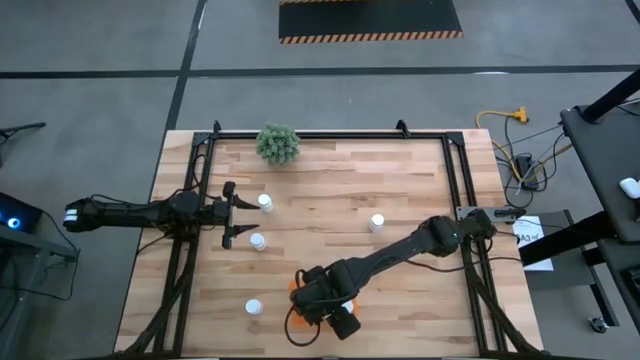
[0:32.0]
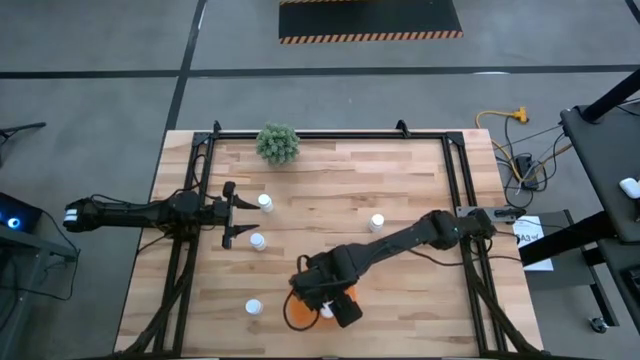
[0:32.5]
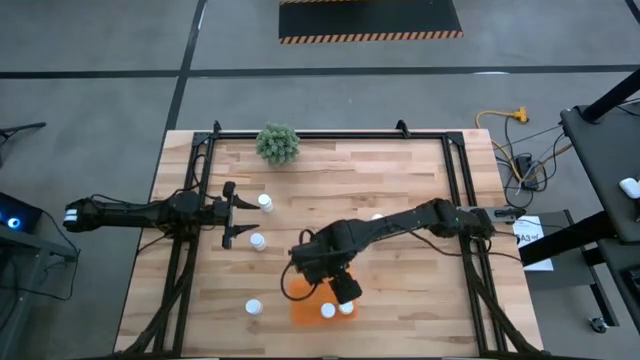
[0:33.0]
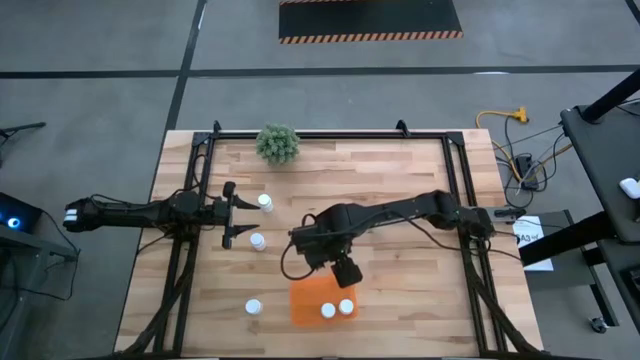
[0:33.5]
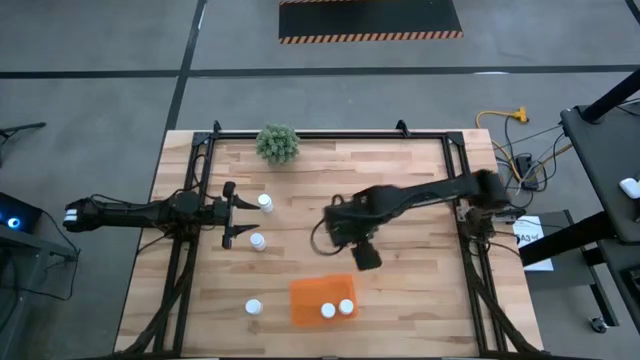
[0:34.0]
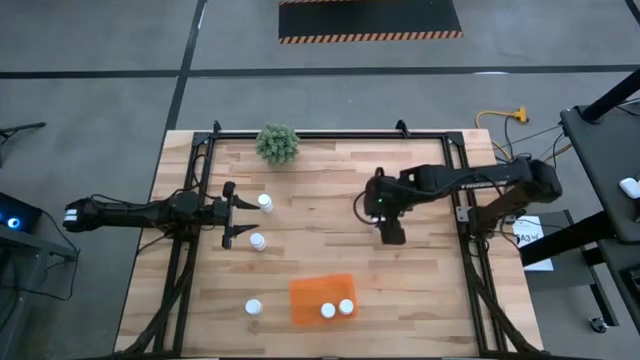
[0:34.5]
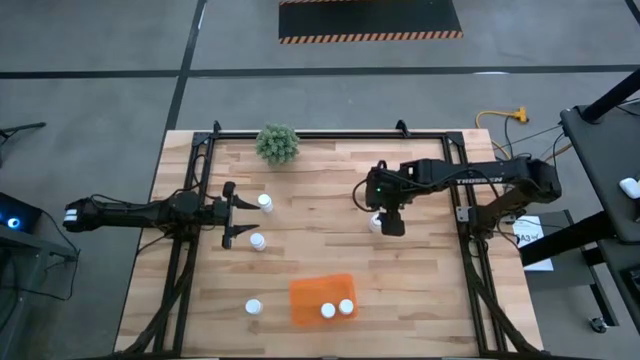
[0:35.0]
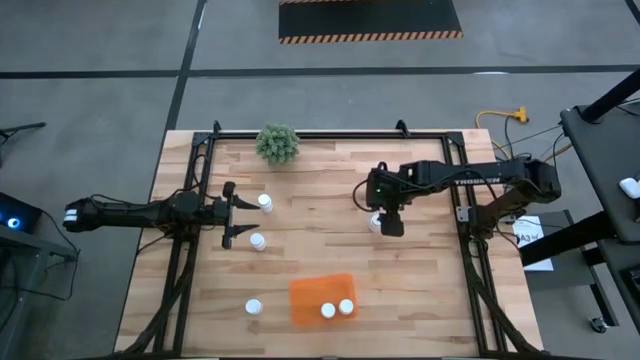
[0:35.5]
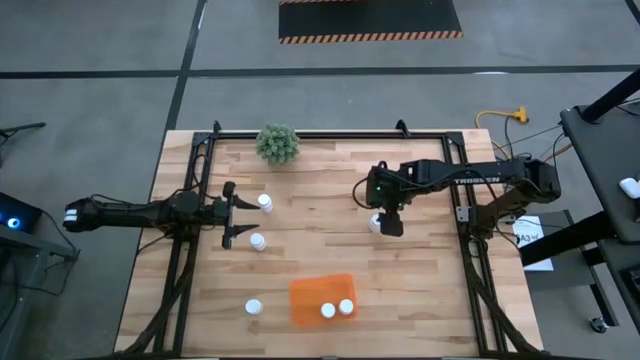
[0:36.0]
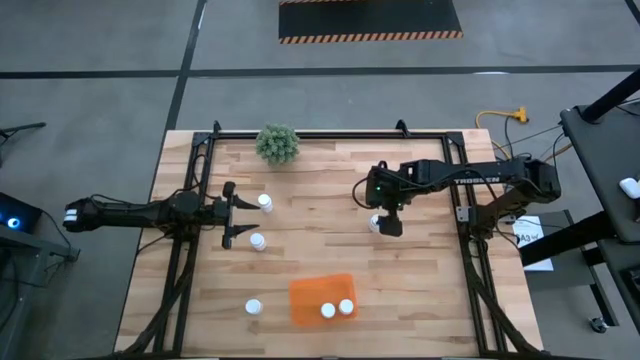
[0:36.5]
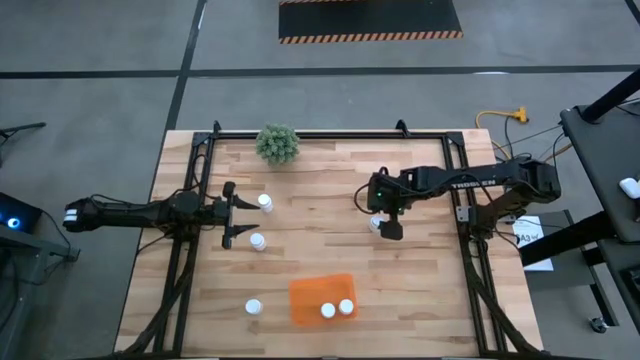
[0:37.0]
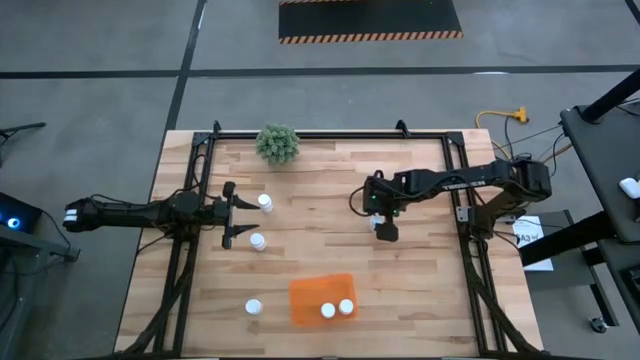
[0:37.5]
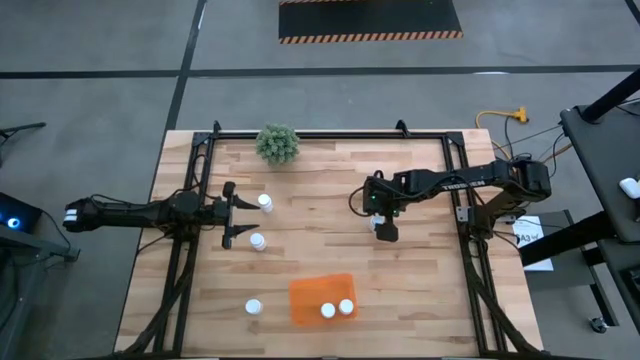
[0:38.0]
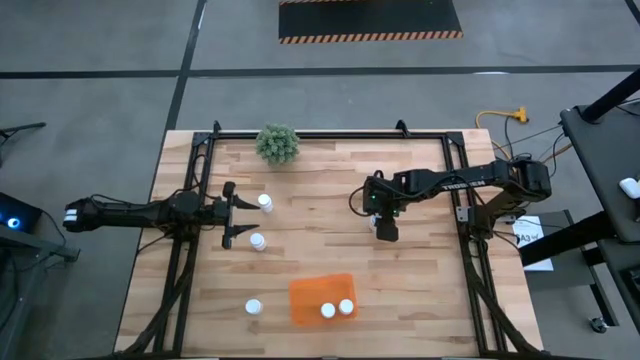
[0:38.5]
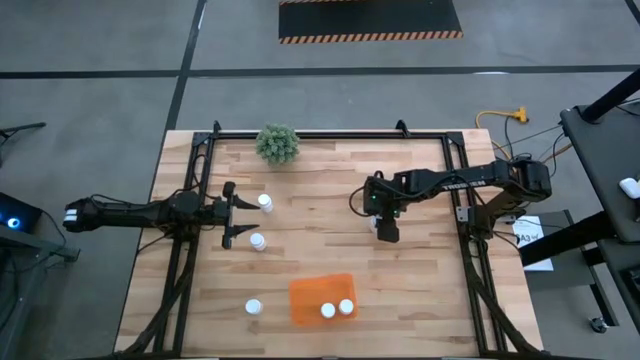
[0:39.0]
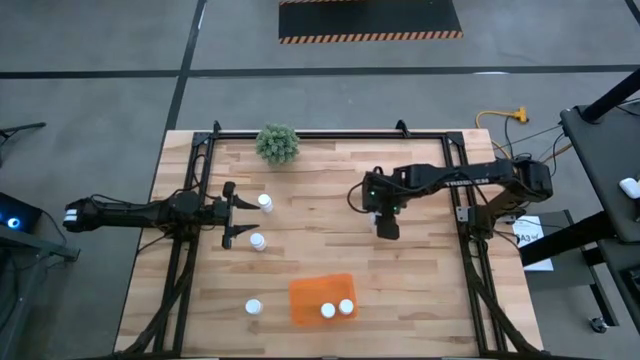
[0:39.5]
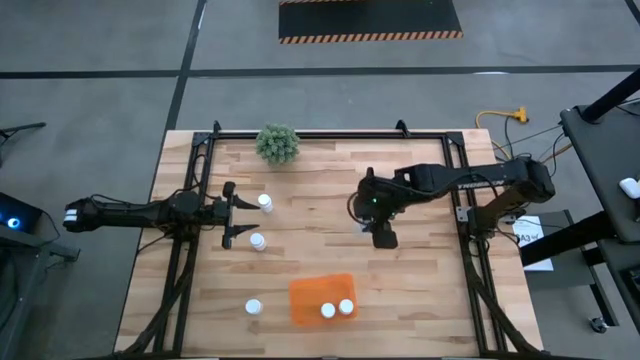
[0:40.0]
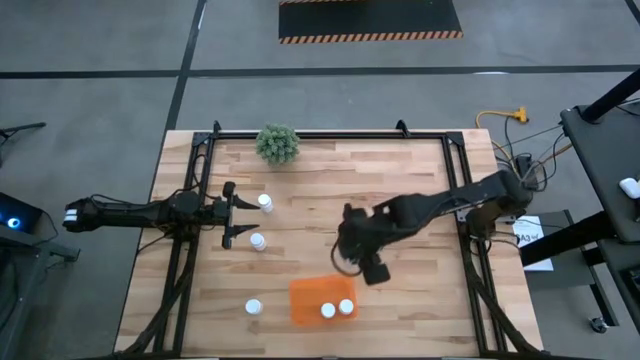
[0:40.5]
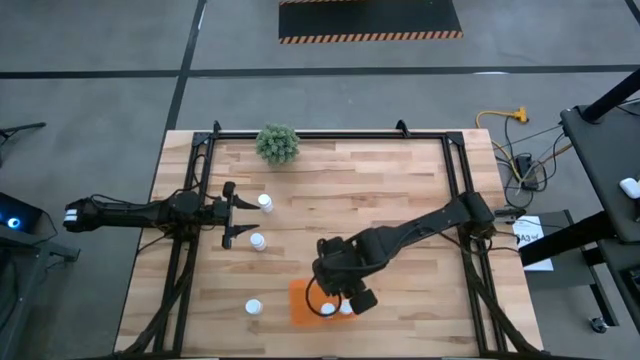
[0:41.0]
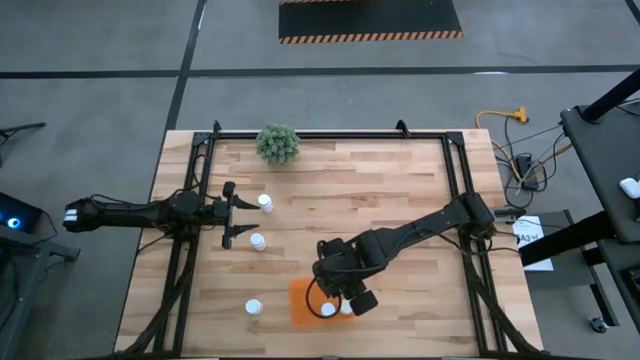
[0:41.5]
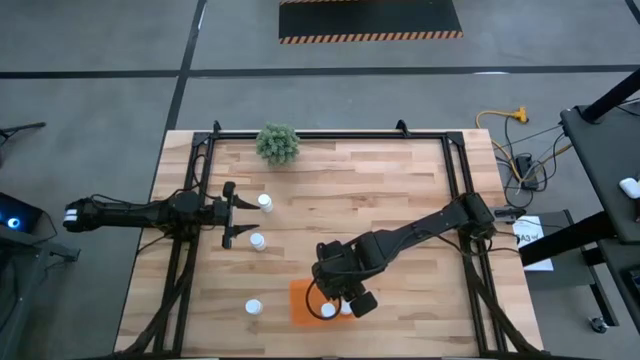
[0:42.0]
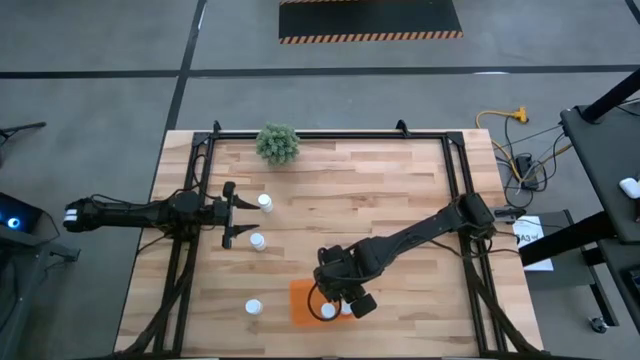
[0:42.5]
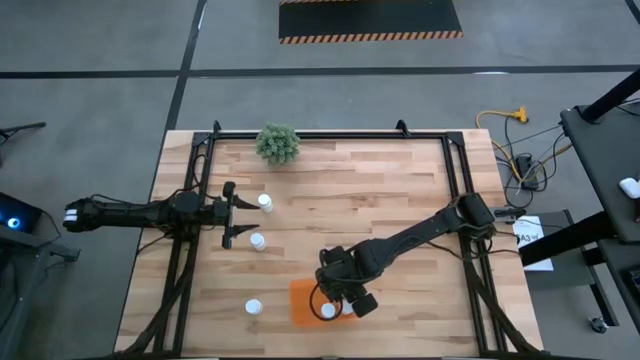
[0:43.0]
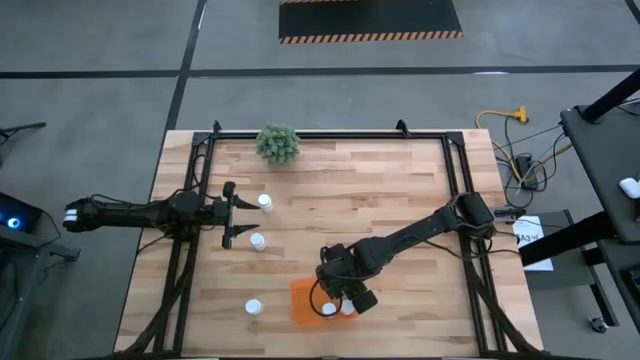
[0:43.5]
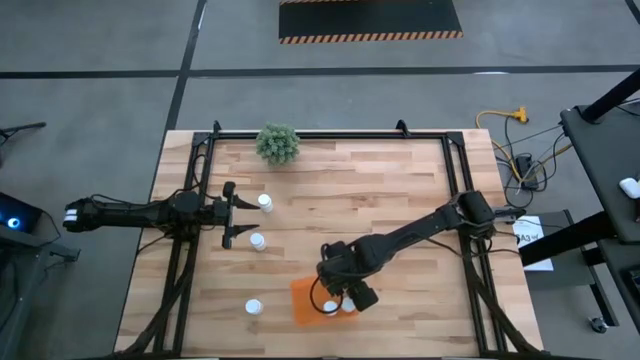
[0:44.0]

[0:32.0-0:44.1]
Task: Pick and place pill bottles into a basket
Put the pill bottle into the bin

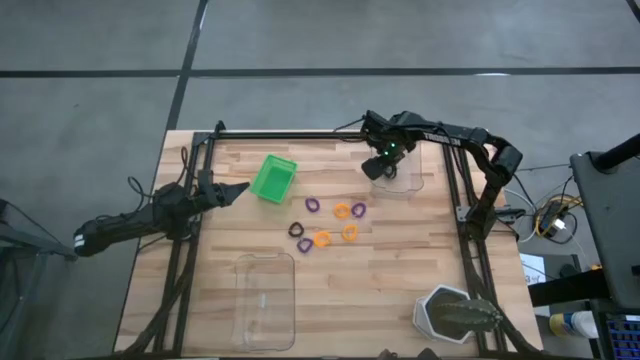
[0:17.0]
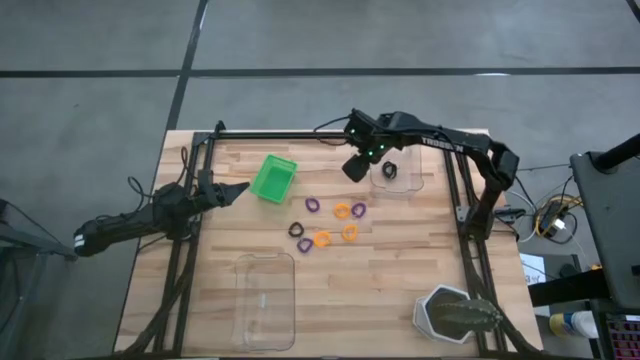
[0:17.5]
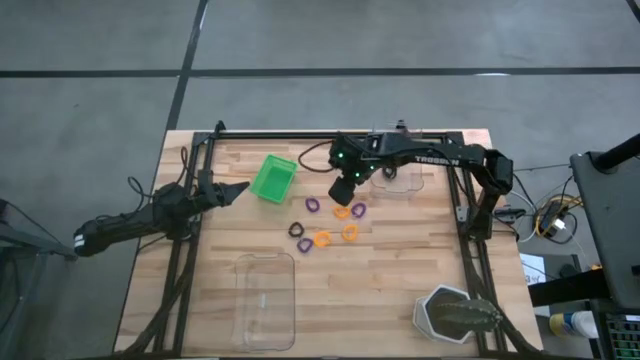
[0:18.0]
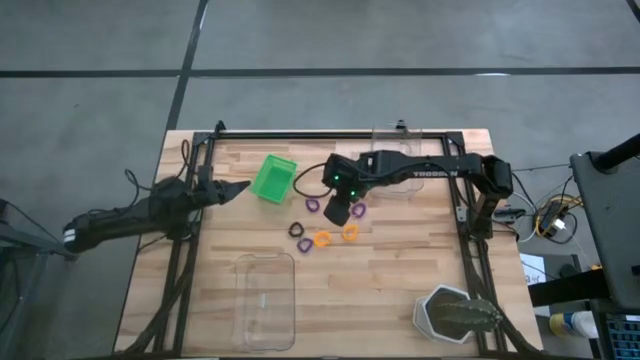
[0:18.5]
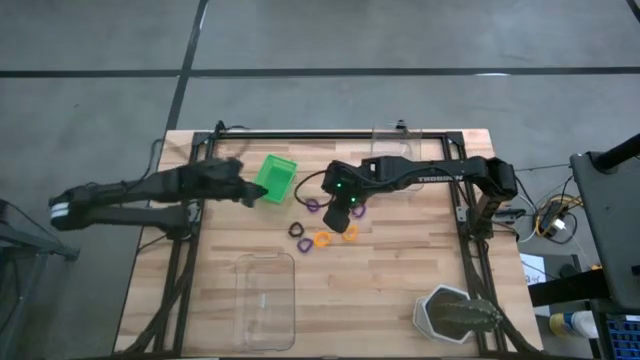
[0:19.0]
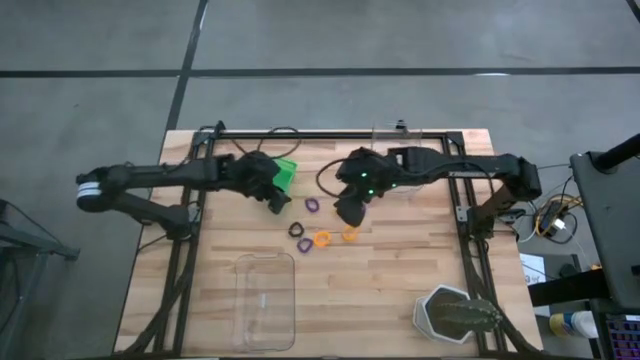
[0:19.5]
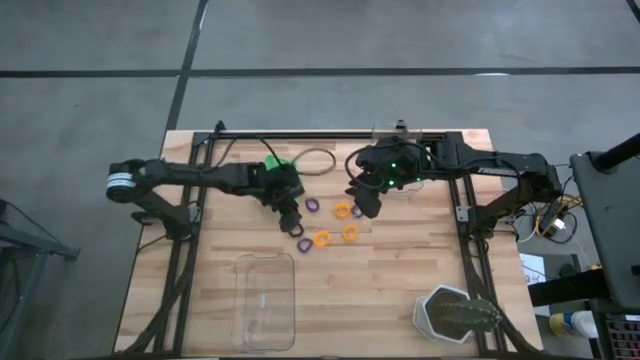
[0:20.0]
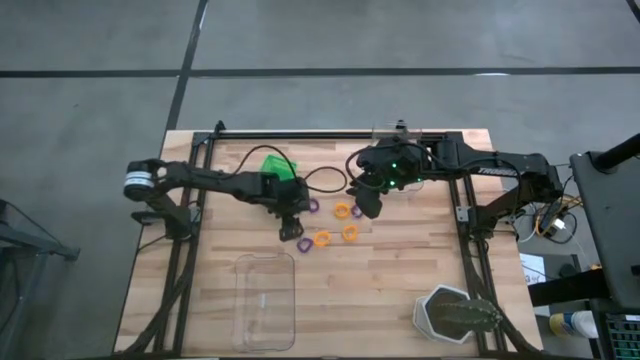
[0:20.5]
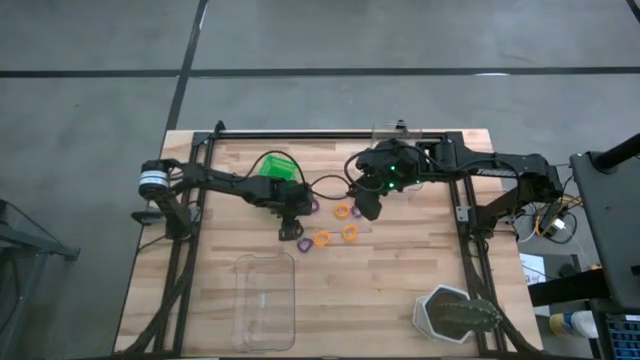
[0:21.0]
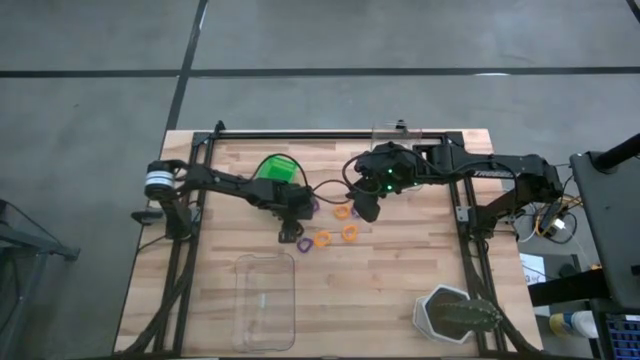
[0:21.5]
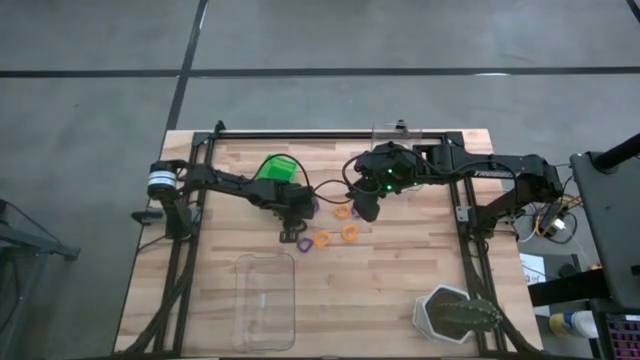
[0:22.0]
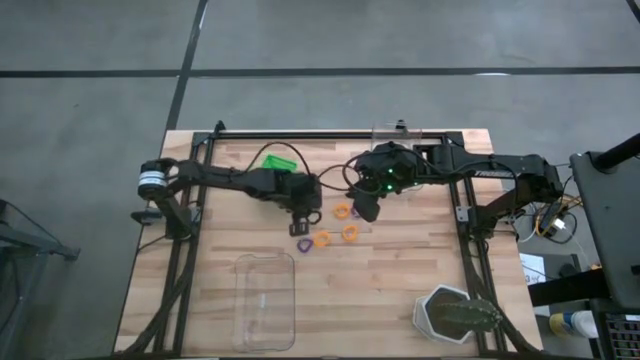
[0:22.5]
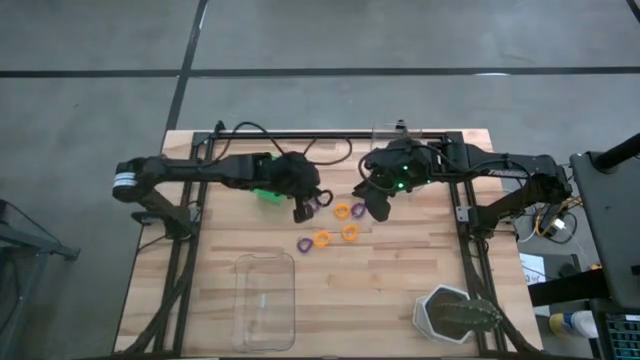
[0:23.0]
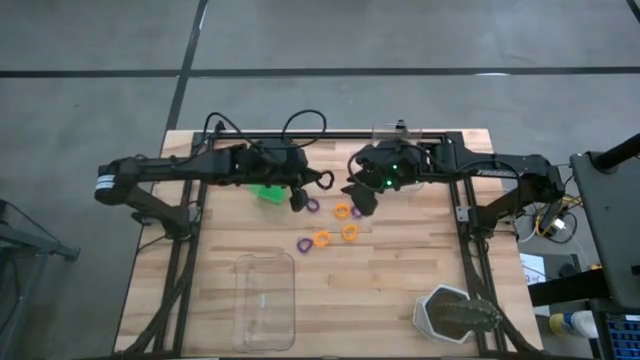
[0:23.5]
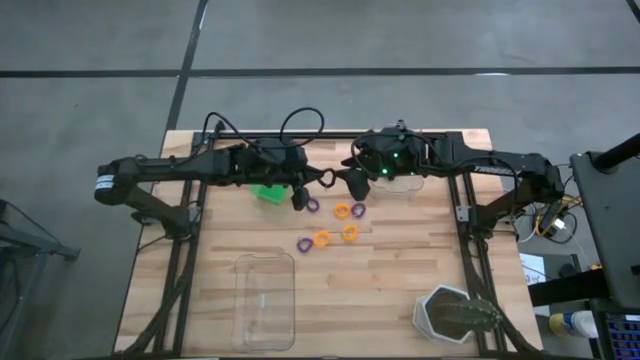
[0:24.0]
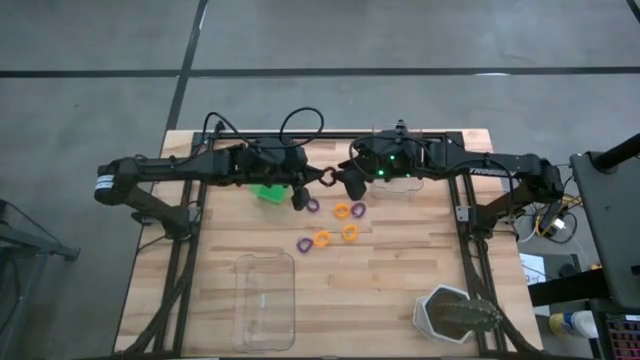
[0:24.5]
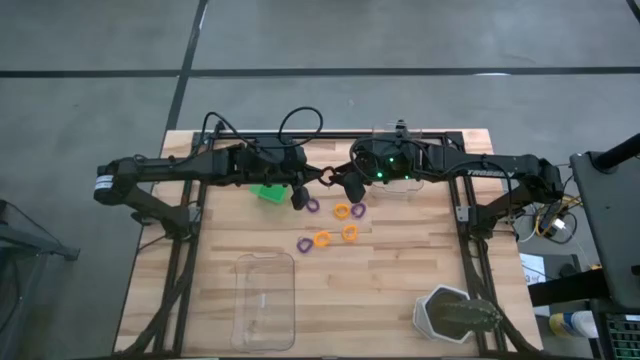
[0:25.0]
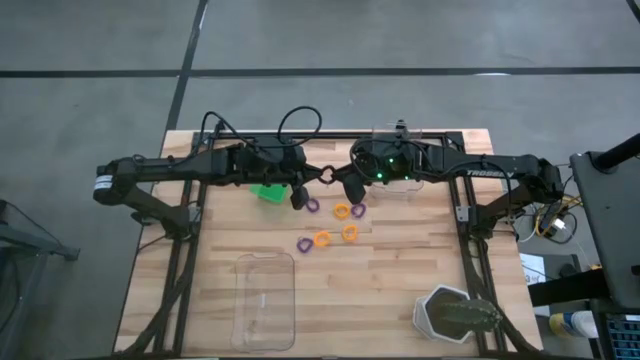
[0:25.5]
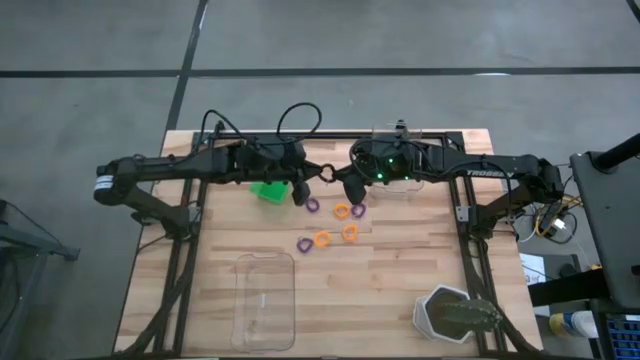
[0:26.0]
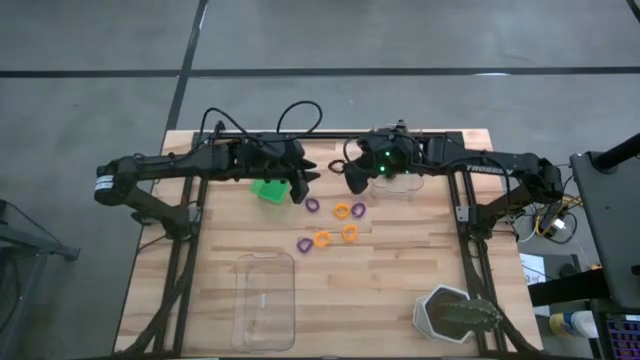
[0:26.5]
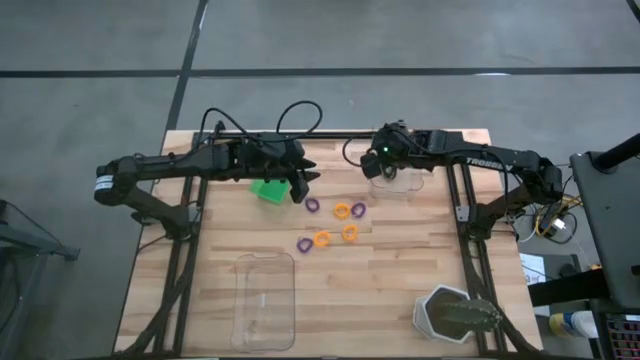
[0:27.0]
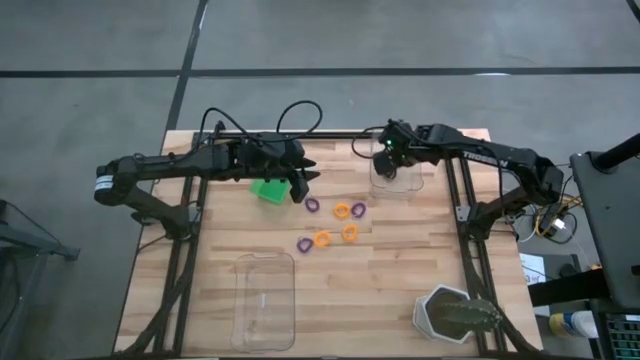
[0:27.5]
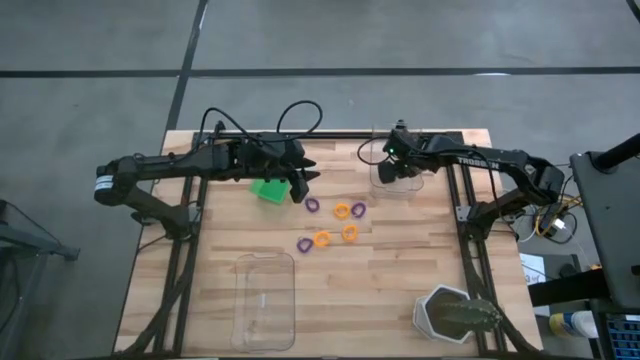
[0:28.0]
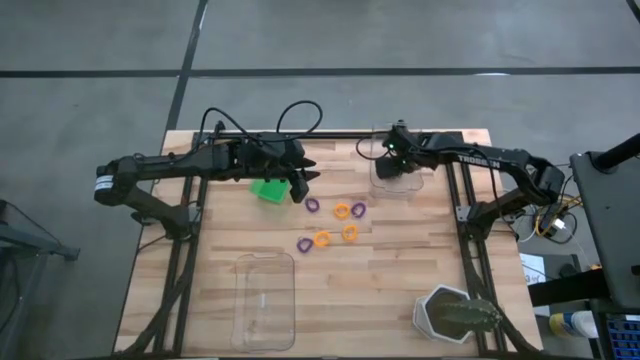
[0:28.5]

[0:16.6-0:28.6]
Task: Sort spring keychains
Put the black spring keychain into the top transparent bin
